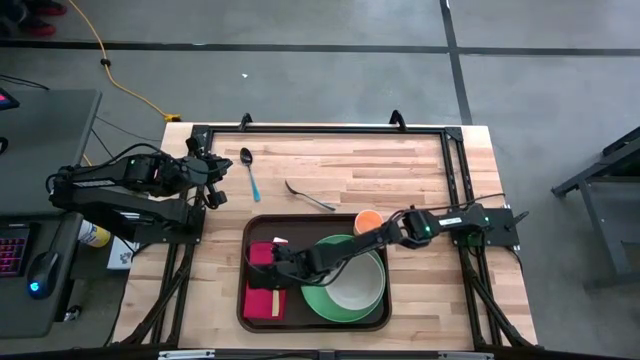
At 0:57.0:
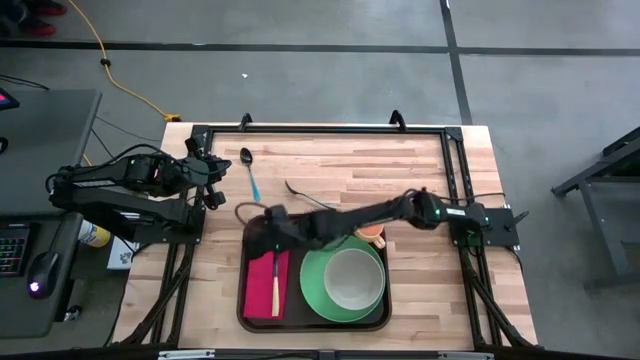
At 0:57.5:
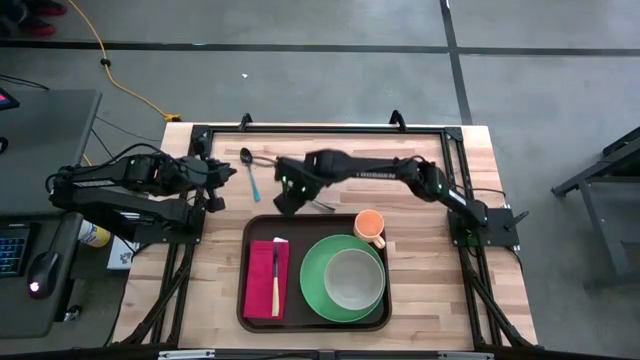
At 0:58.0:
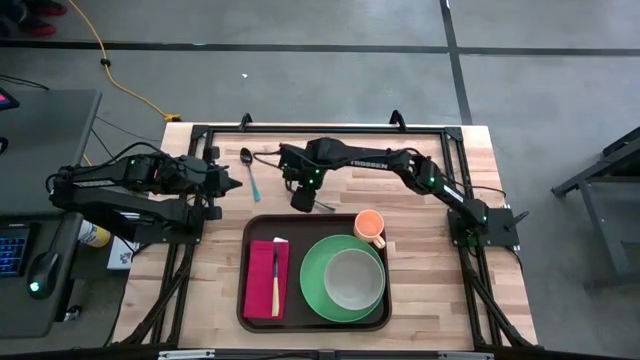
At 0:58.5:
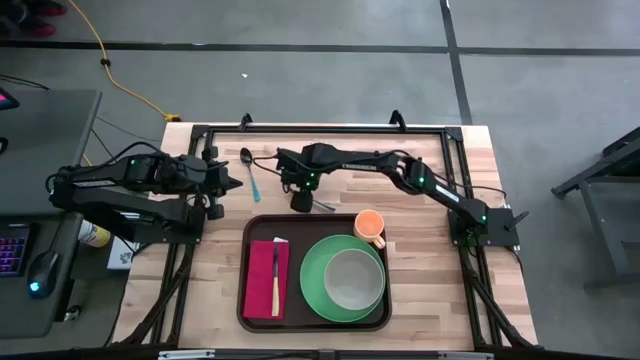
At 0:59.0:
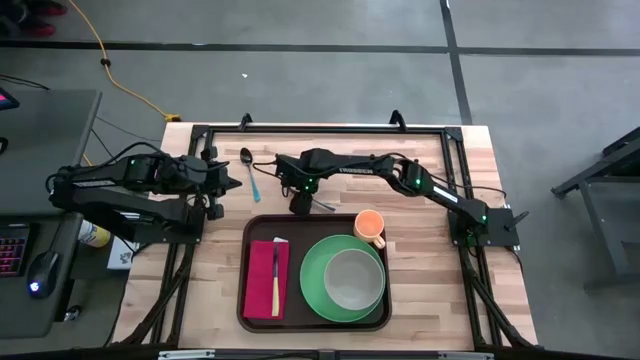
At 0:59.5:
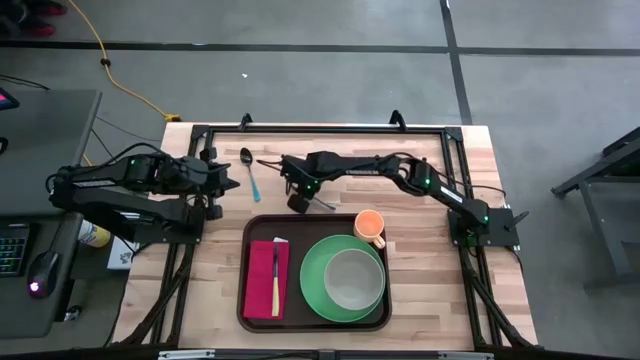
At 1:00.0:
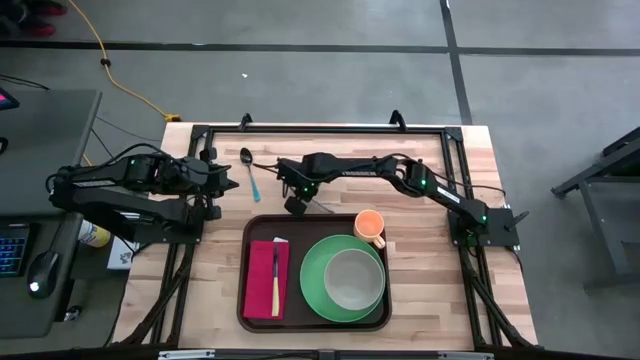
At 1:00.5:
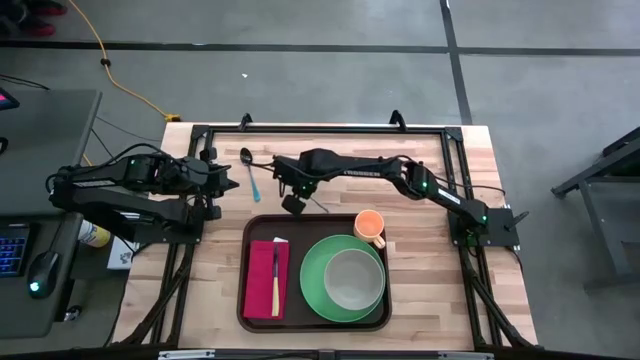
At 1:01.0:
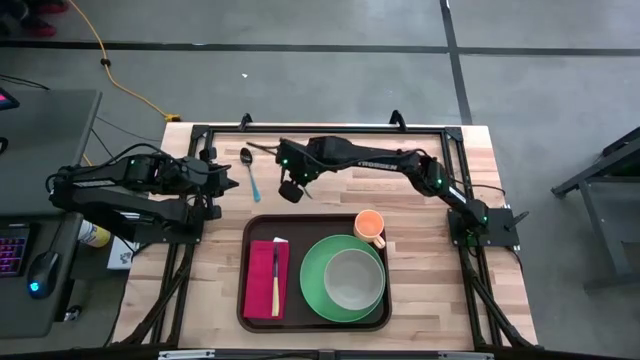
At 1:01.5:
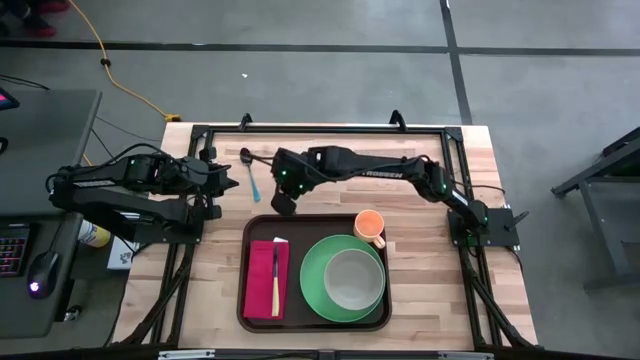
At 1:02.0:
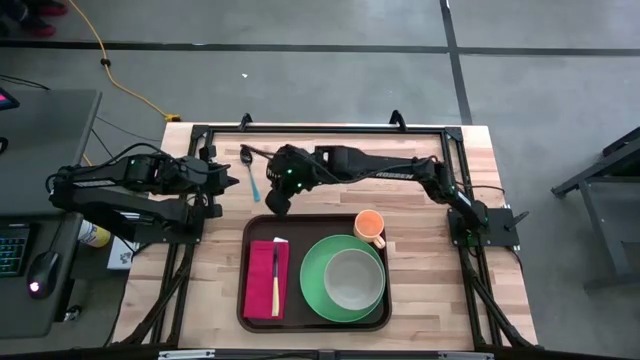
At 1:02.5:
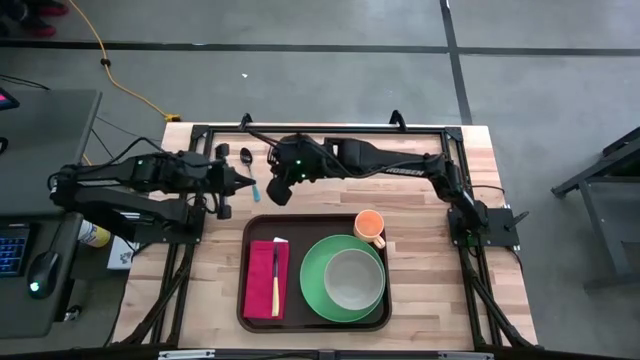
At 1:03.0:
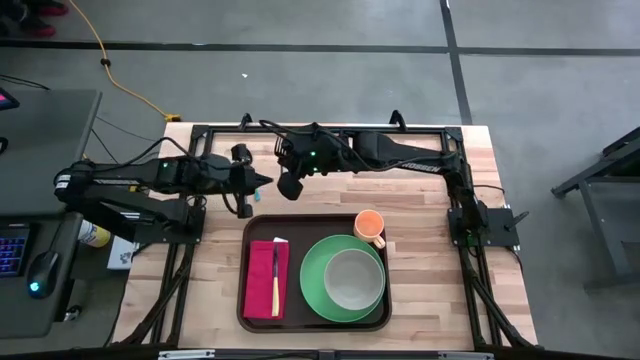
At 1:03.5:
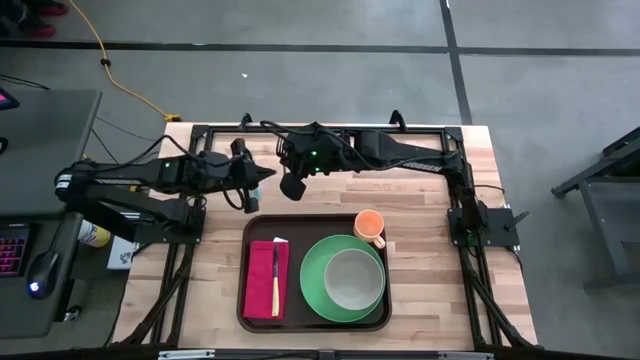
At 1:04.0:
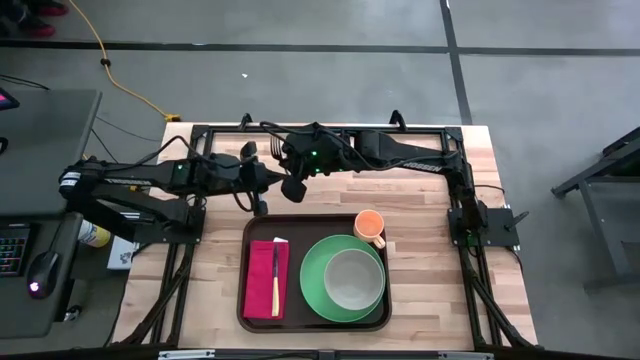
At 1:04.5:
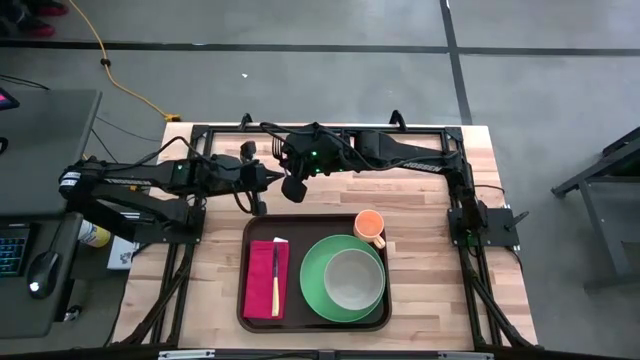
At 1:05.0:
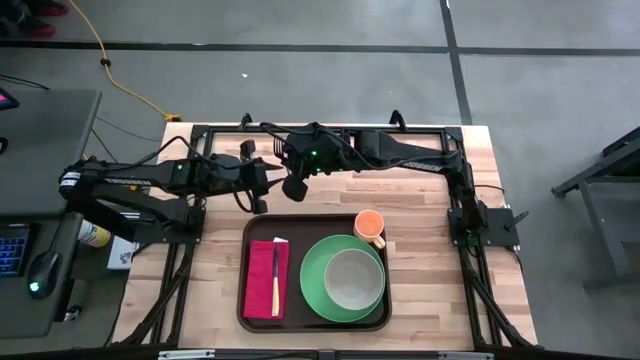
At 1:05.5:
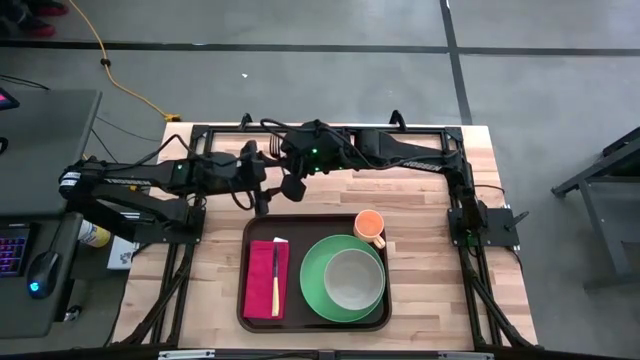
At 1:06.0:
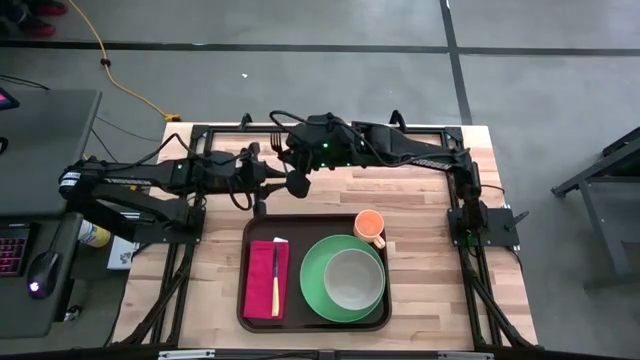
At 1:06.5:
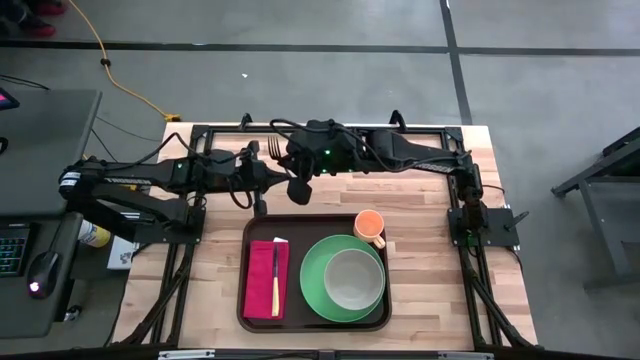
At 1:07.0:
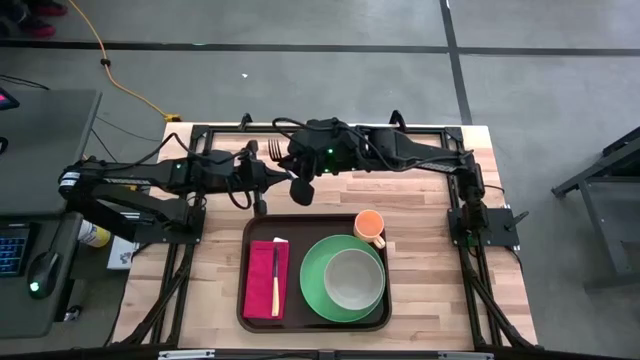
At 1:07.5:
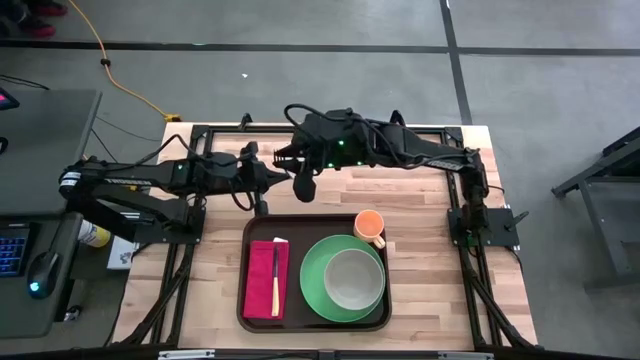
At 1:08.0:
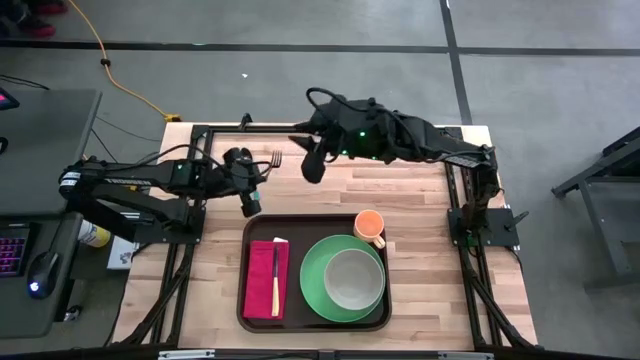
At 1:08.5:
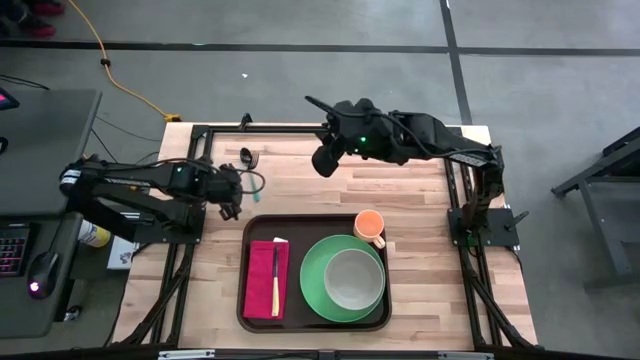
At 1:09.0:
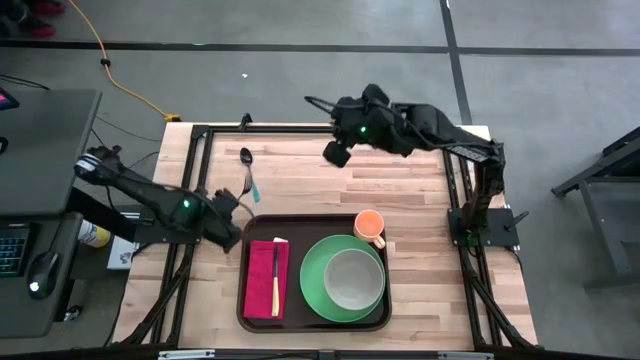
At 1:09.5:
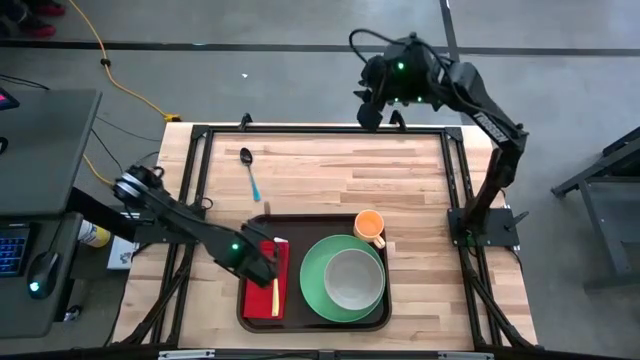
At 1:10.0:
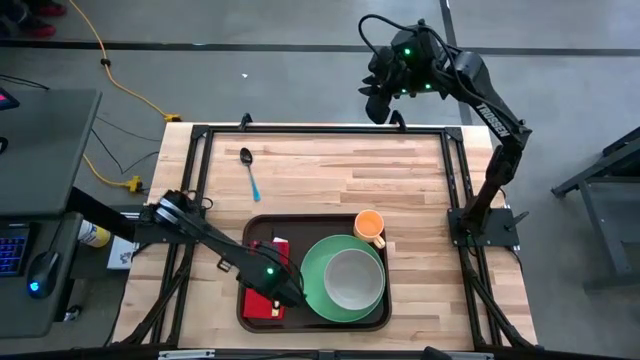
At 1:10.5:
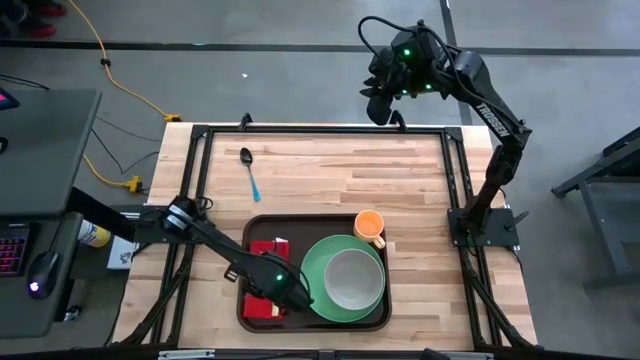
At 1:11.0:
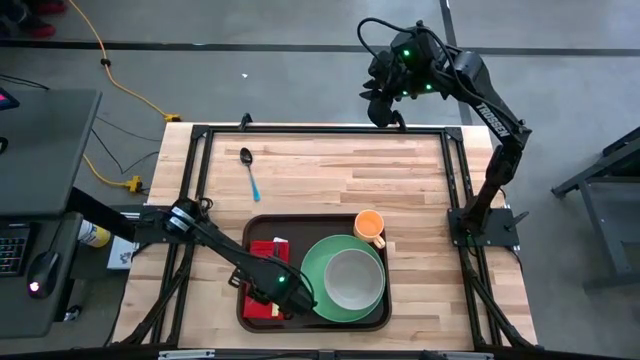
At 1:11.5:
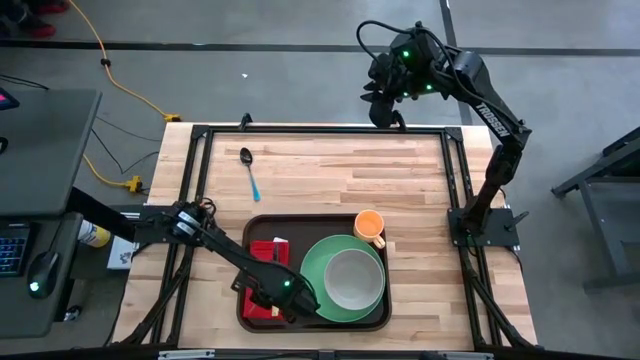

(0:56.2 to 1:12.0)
Task: Set up tray
Put the blue fork on the red napkin

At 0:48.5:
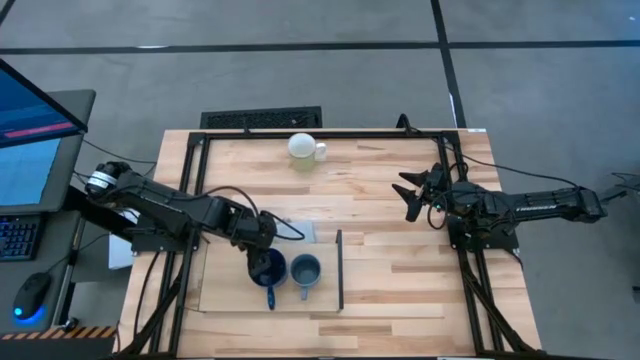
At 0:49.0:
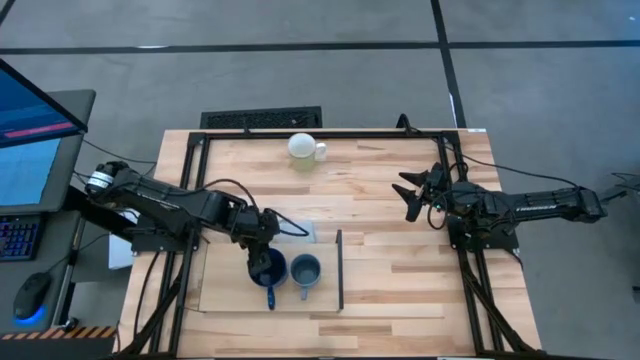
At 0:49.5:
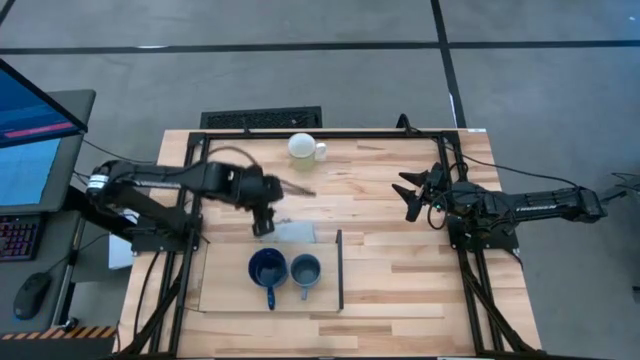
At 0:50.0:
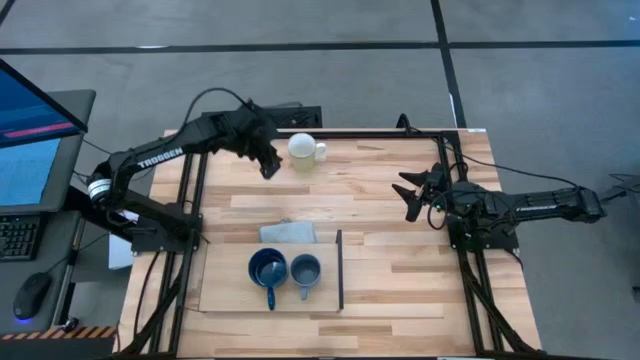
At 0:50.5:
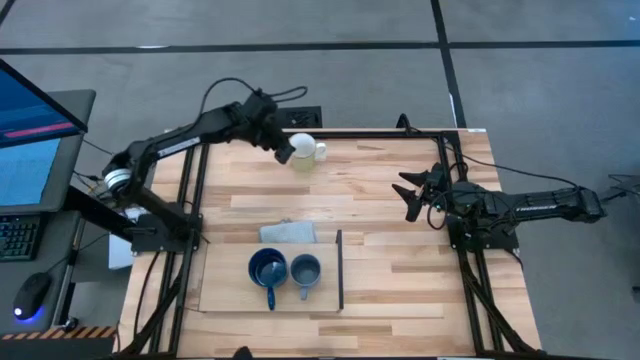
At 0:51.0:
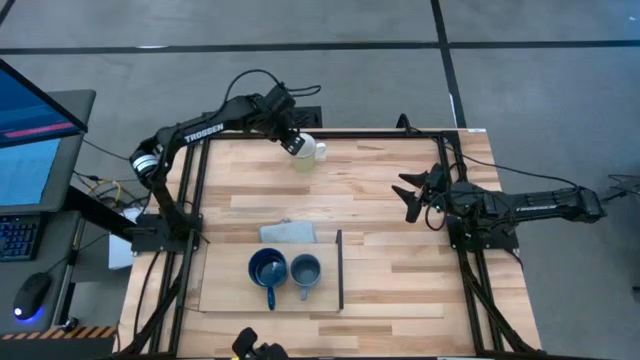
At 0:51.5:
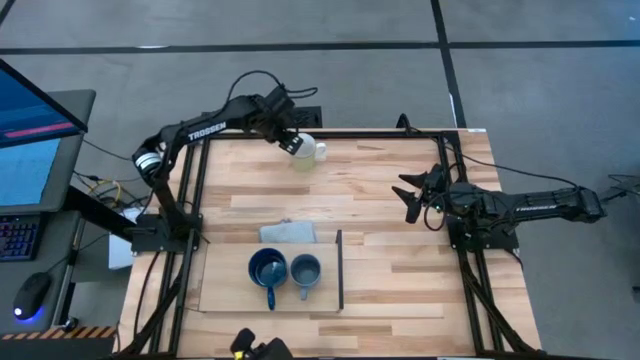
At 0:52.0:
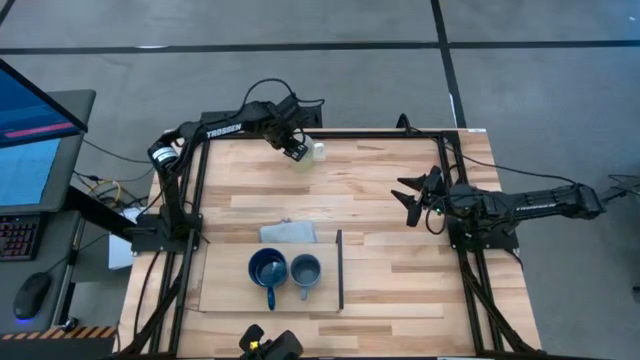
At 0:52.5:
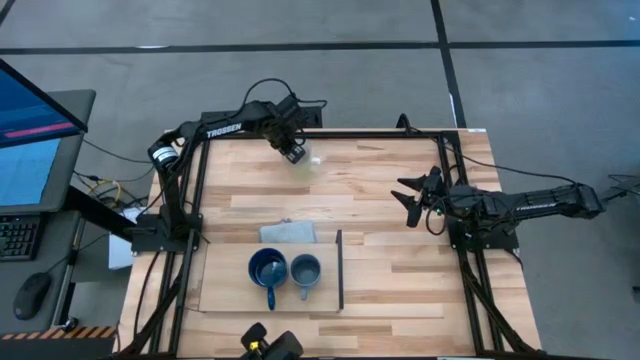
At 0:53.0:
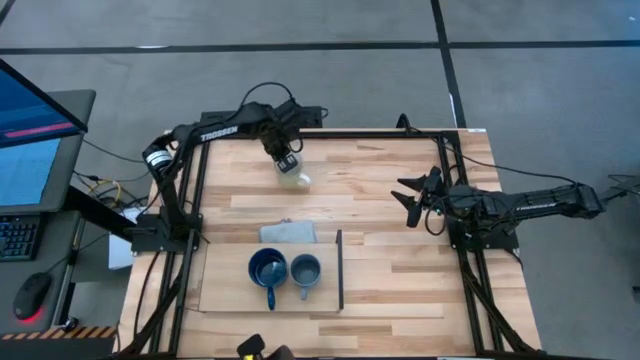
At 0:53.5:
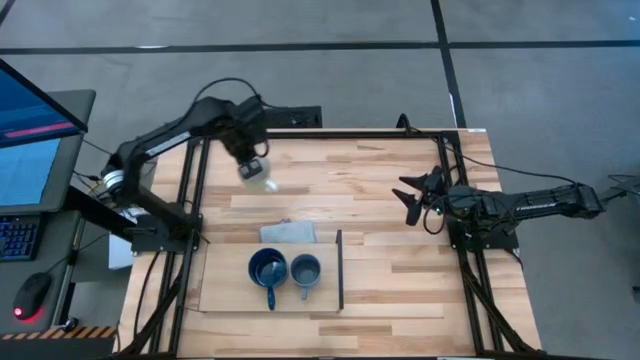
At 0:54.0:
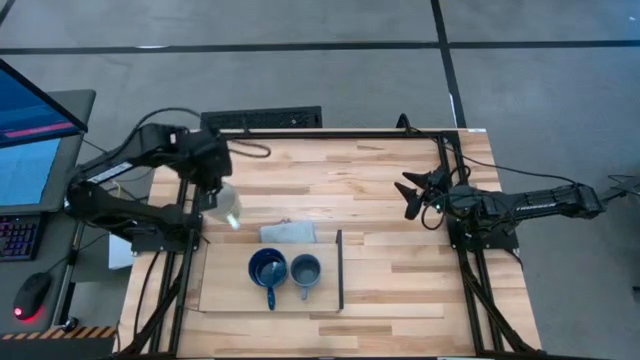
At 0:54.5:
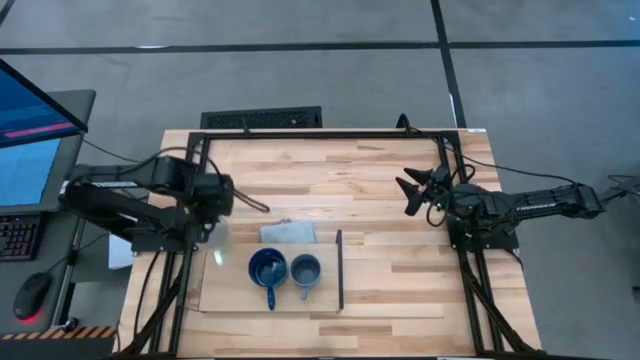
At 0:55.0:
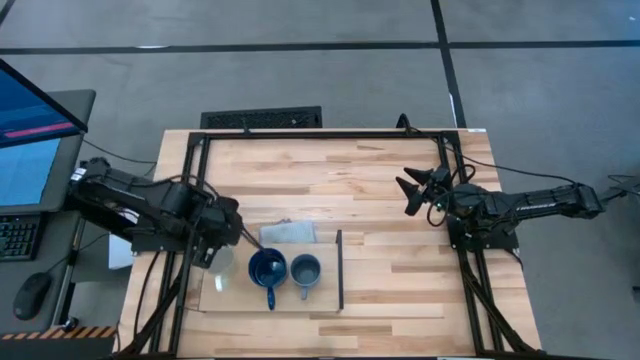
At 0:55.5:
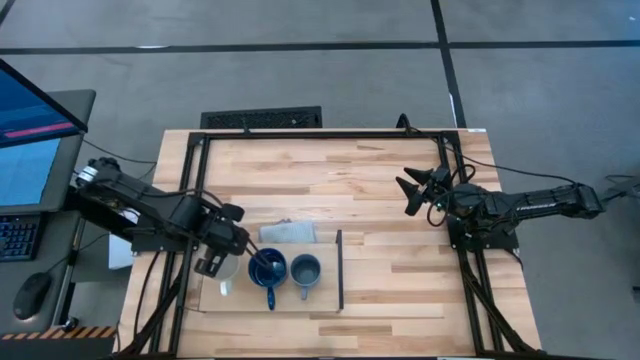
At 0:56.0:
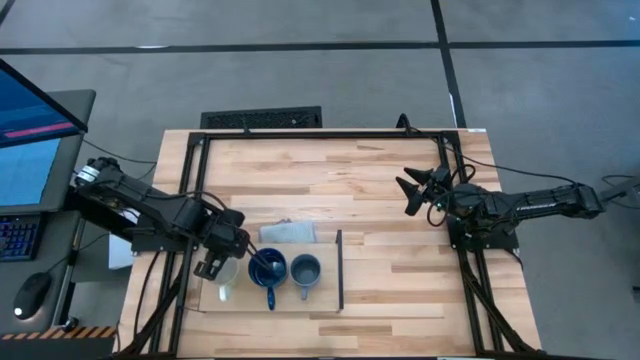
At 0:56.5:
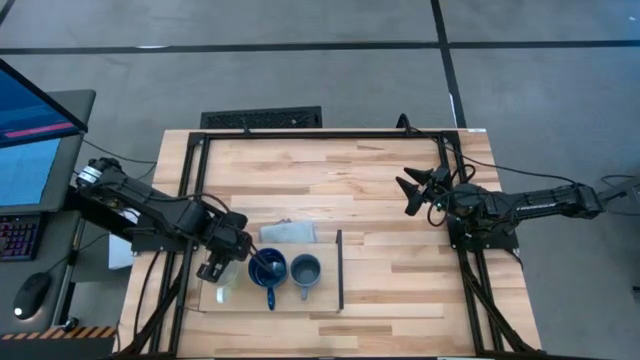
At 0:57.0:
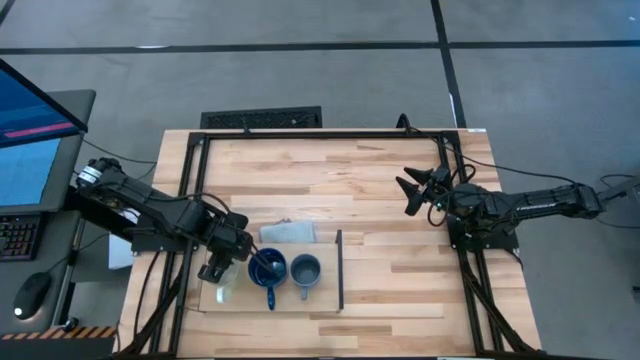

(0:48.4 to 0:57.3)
Task: Stack small to large cups/mugs on shelf
Put the light green mug on the shelf
